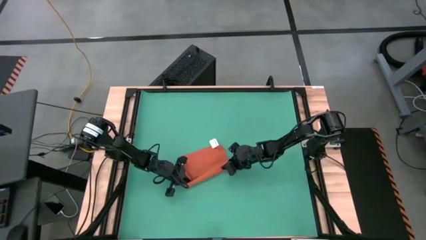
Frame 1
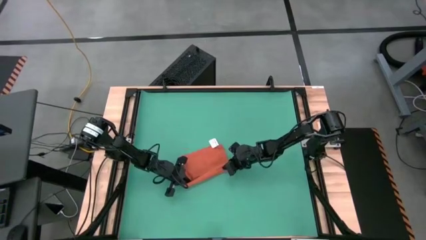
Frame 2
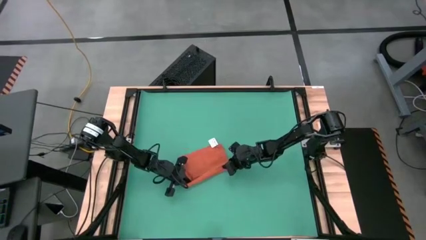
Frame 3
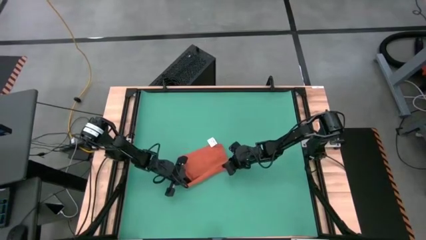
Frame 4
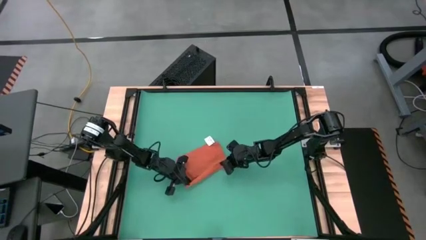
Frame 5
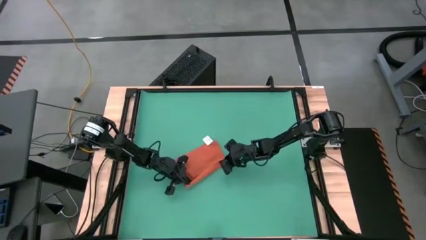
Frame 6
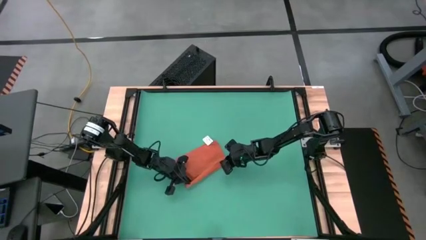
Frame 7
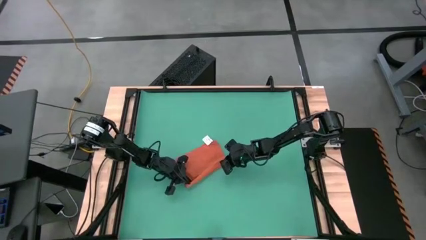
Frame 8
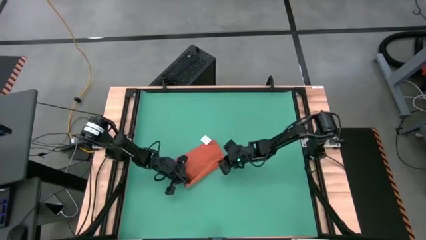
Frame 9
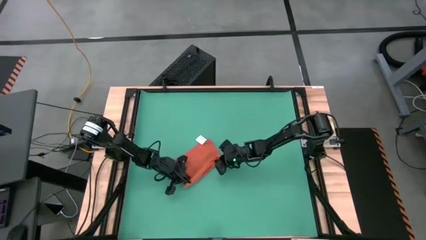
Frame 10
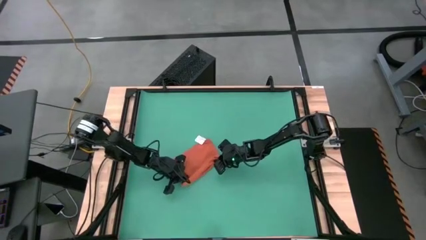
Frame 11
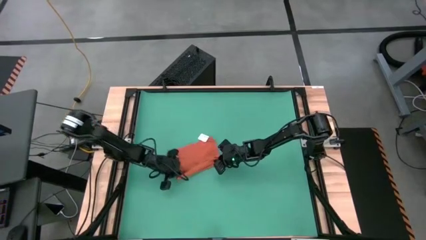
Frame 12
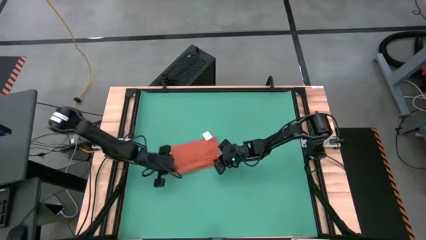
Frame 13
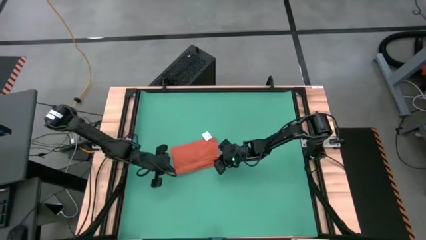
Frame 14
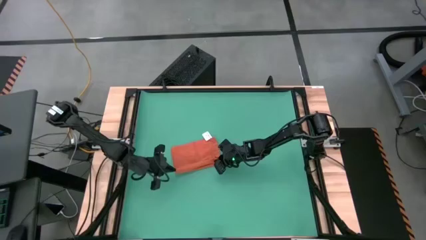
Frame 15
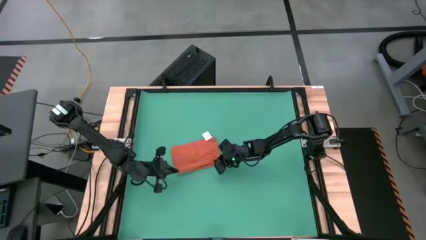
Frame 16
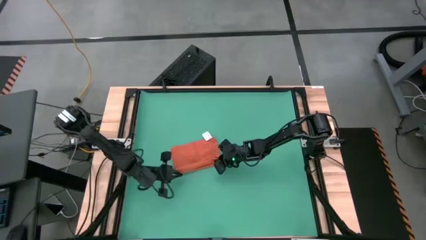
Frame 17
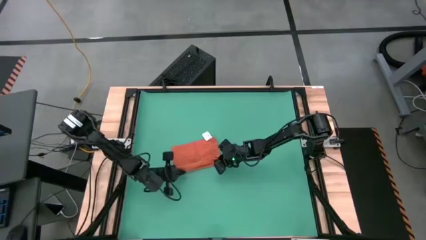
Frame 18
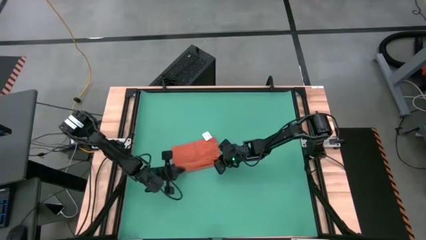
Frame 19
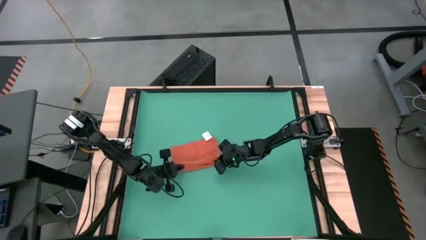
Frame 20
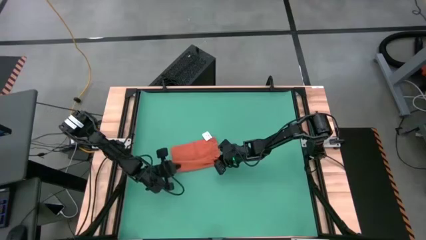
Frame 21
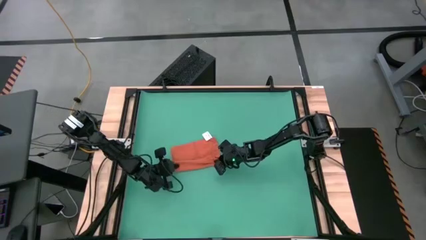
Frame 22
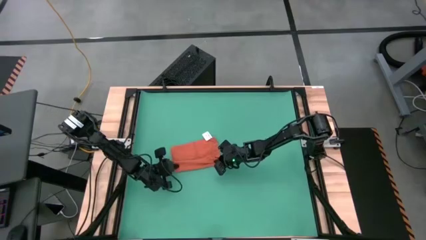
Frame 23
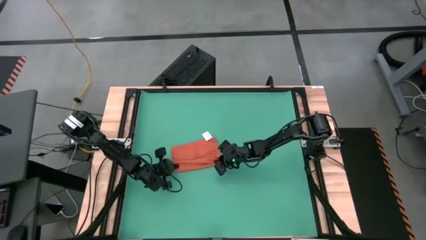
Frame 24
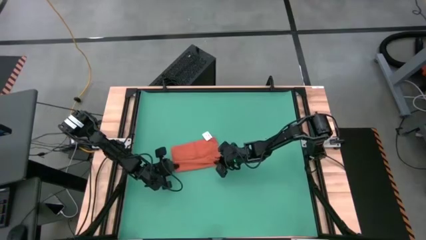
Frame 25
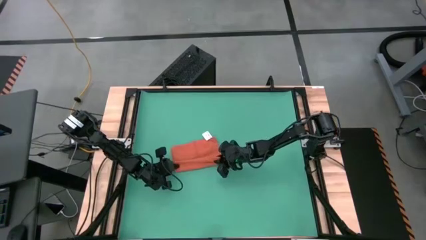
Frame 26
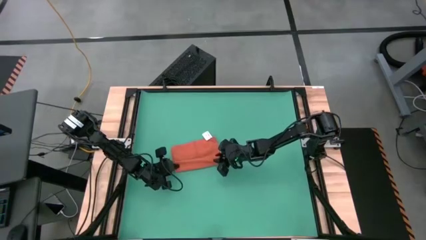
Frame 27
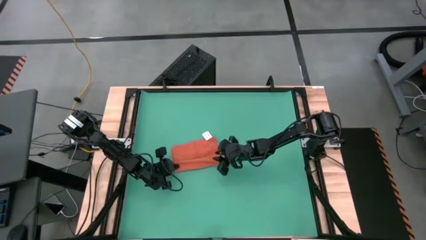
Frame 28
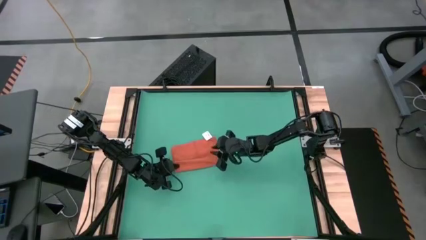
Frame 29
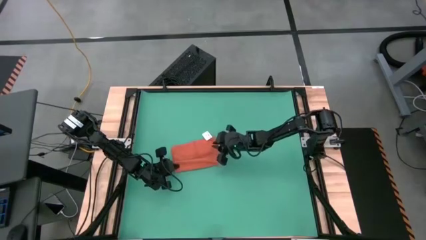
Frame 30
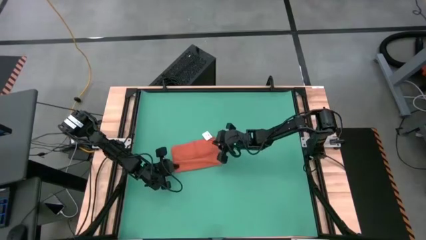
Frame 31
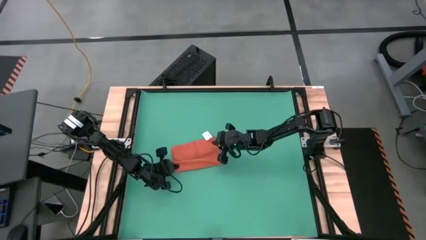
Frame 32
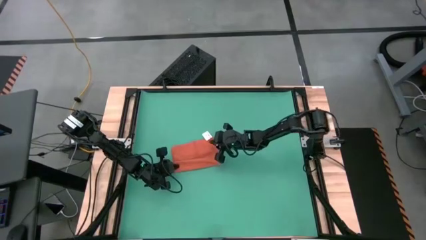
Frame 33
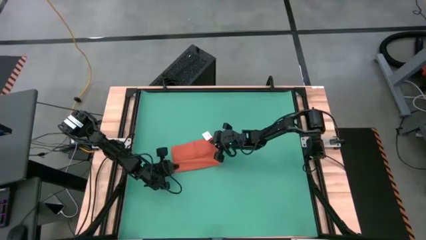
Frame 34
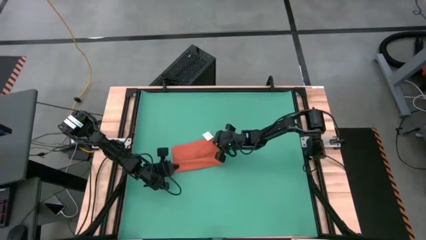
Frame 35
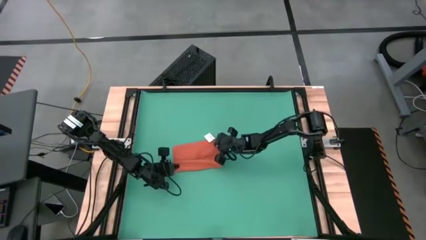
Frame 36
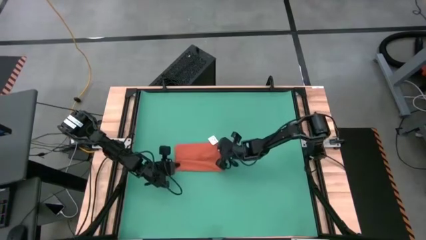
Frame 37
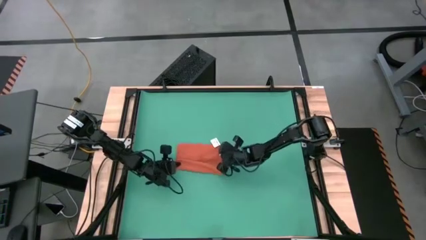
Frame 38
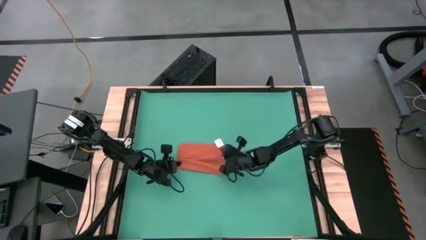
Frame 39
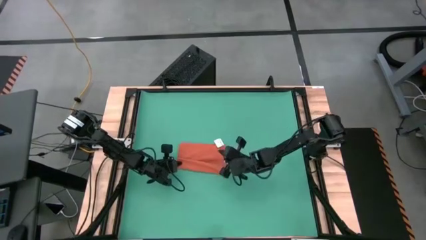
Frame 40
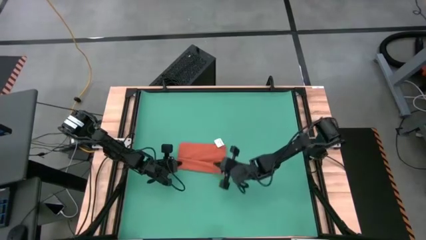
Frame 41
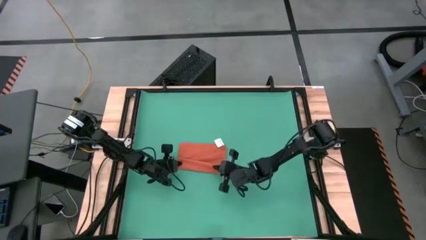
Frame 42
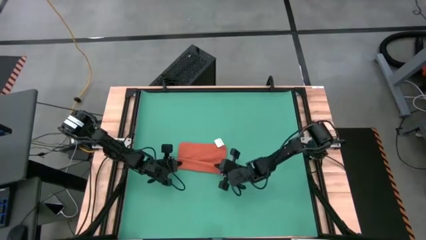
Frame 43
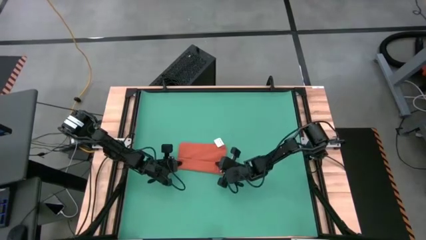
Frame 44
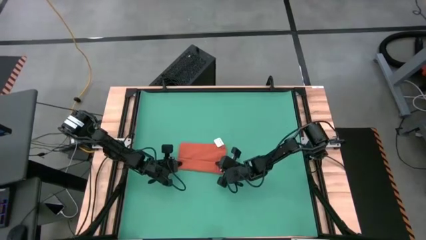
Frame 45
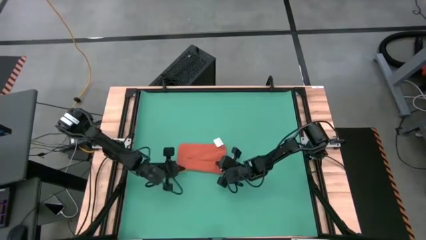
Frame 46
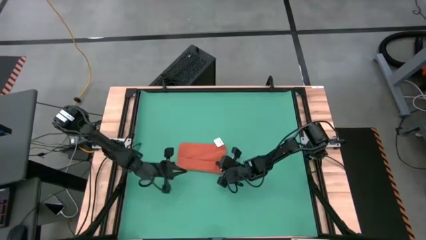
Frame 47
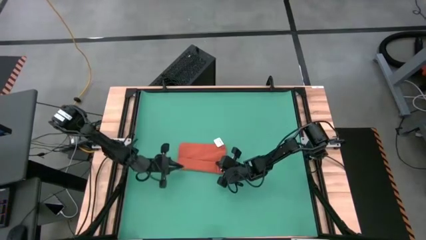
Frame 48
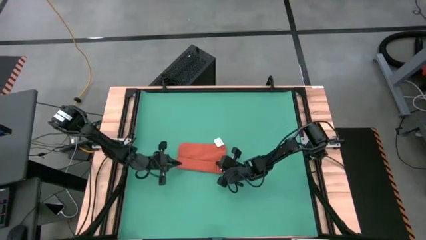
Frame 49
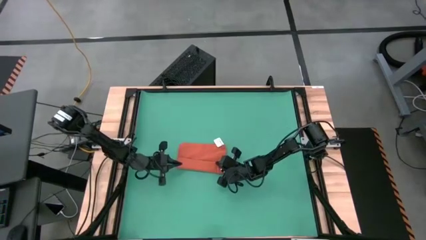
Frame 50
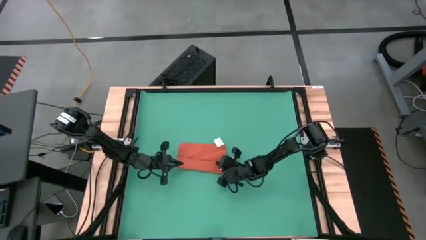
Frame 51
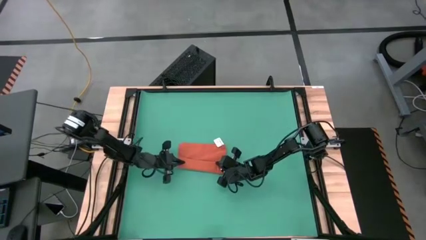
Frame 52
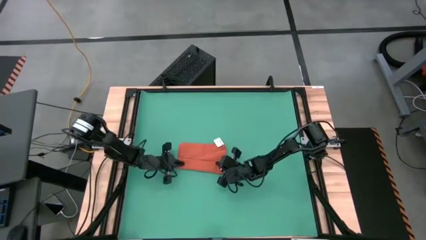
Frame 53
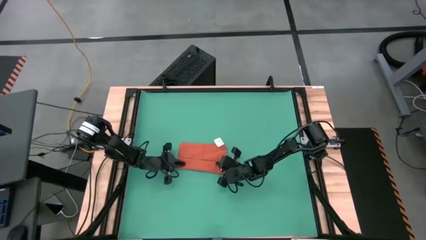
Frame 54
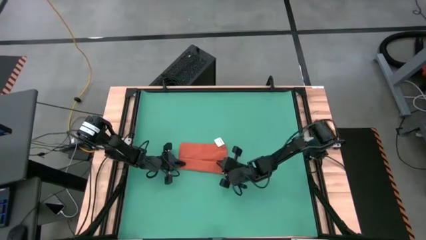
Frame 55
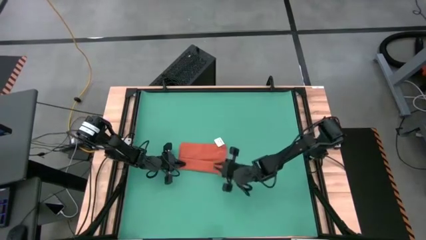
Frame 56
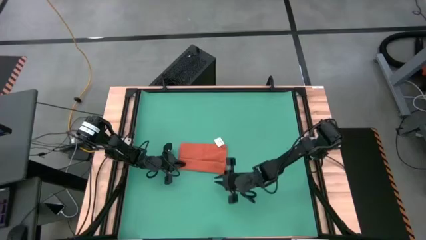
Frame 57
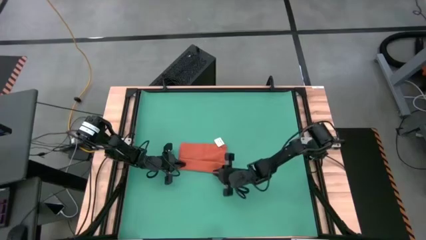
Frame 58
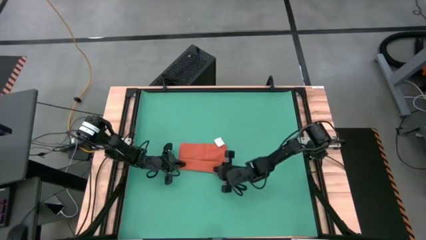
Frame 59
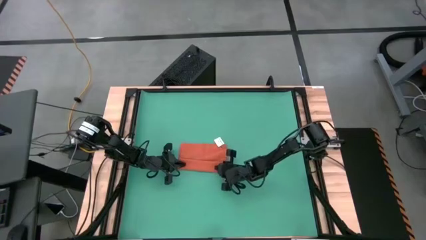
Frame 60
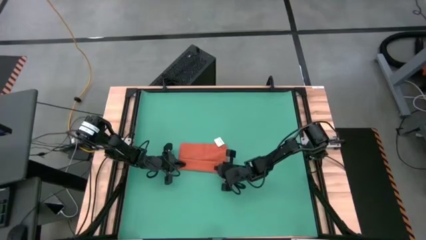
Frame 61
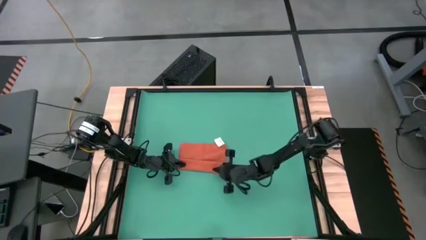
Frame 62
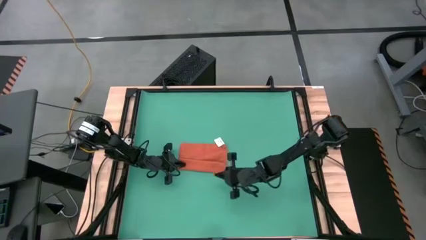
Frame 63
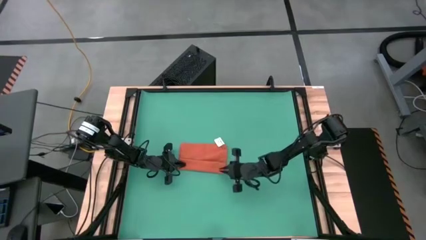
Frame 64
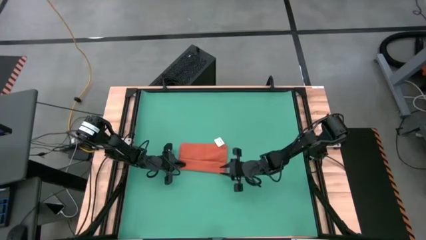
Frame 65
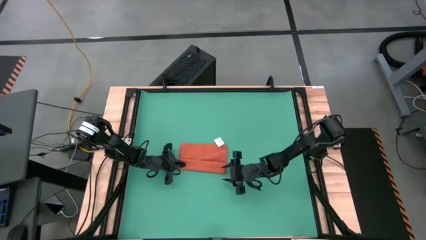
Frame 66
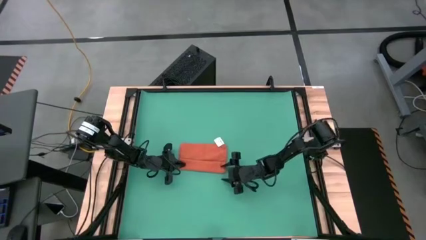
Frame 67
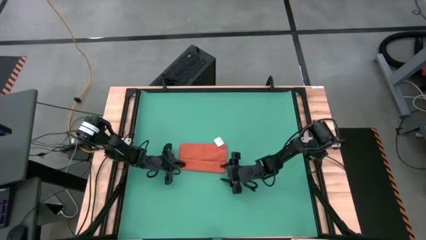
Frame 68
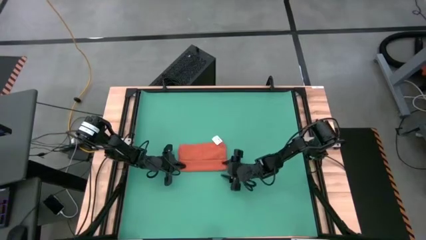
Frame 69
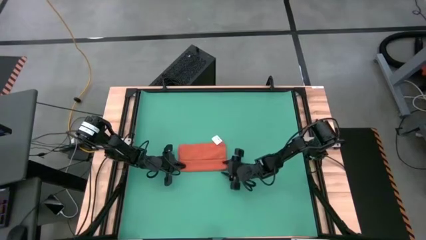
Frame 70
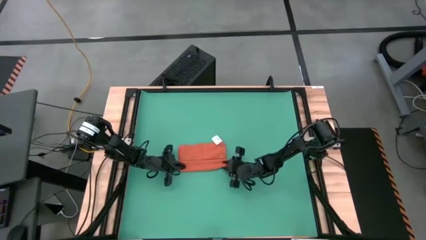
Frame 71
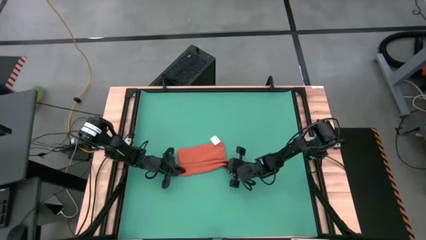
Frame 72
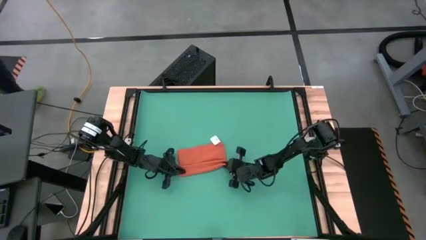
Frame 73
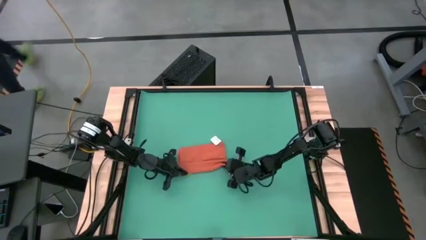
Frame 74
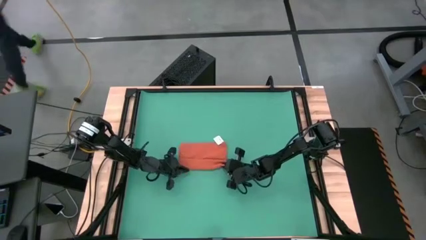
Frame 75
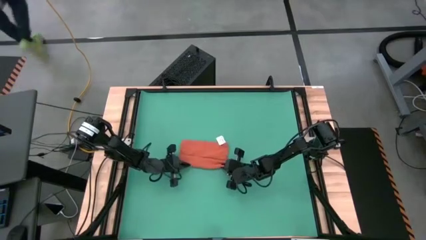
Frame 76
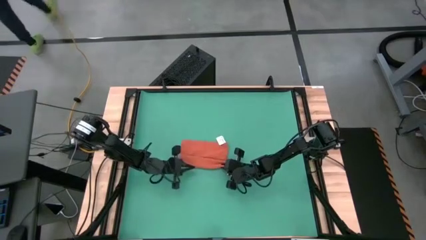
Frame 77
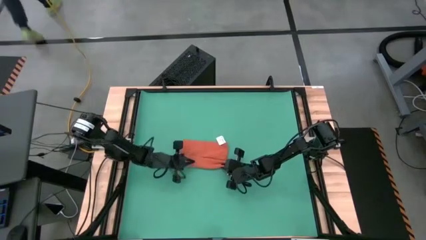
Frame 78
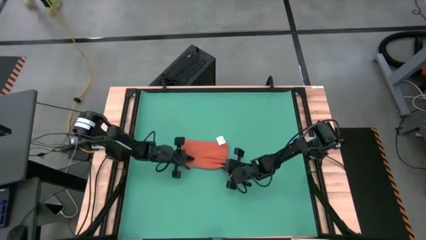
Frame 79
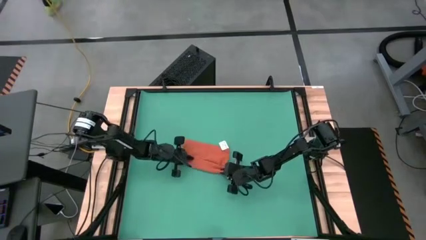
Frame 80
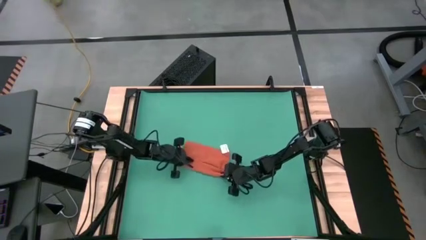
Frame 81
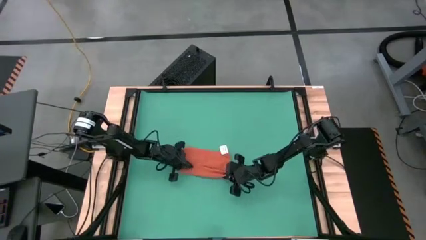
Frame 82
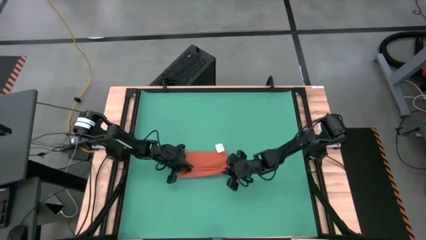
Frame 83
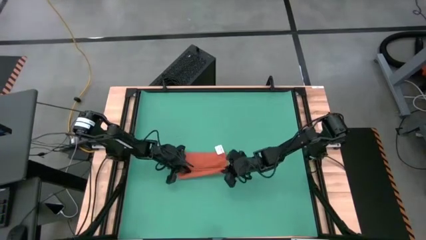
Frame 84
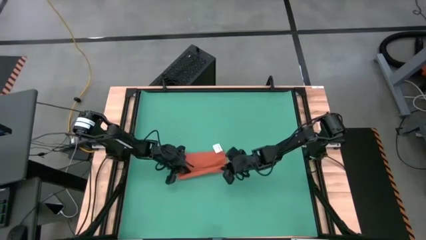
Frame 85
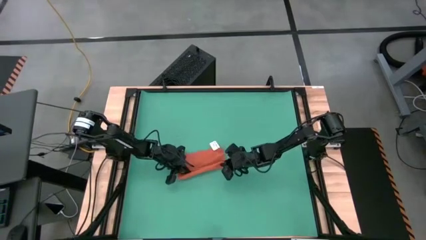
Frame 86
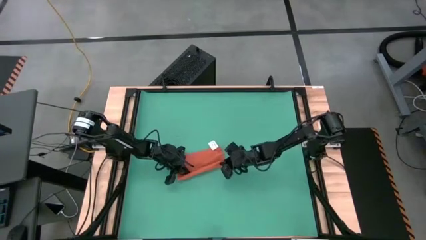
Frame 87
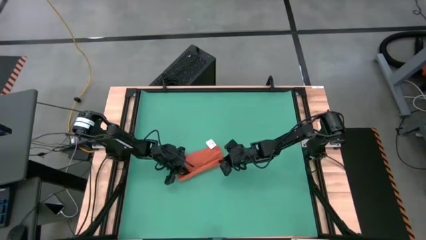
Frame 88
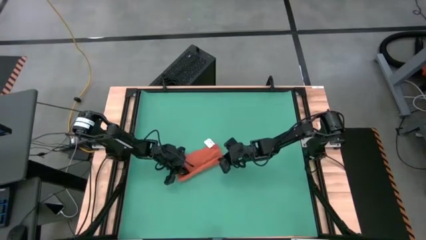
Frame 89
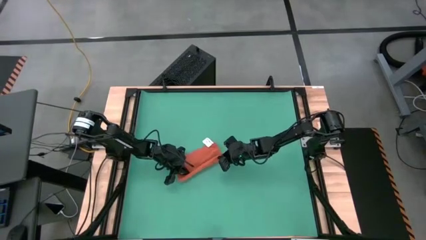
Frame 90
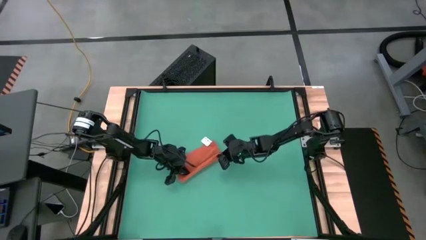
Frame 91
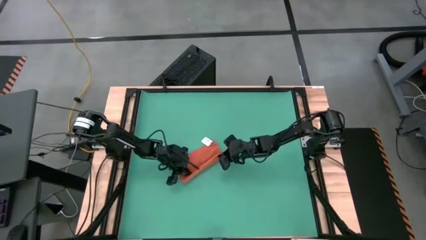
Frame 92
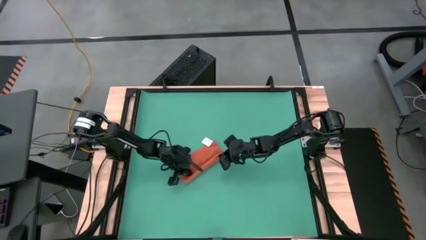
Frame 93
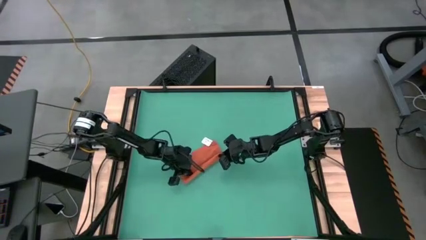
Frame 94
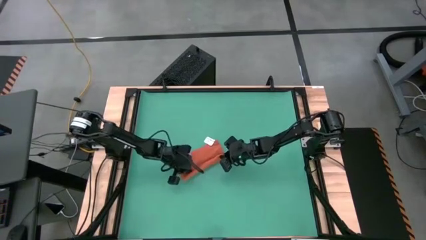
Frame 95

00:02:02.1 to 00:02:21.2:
Task: Roll napkin
Roll the orange table napkin
